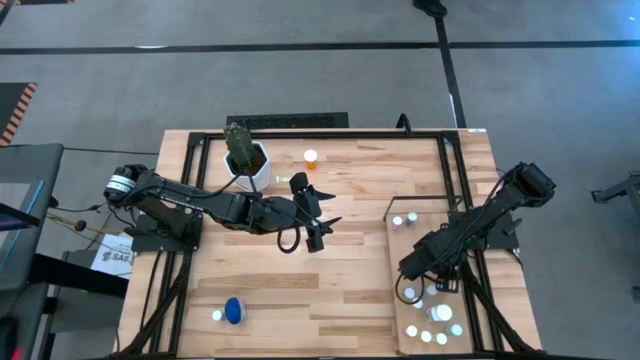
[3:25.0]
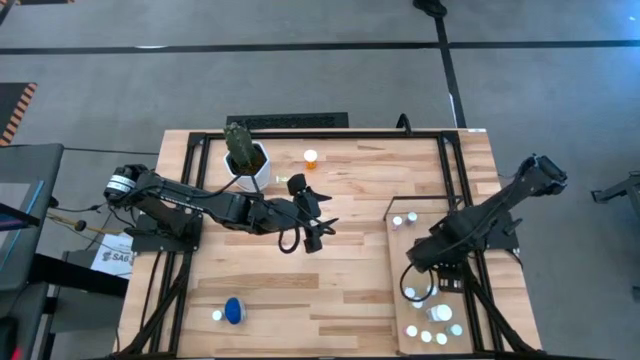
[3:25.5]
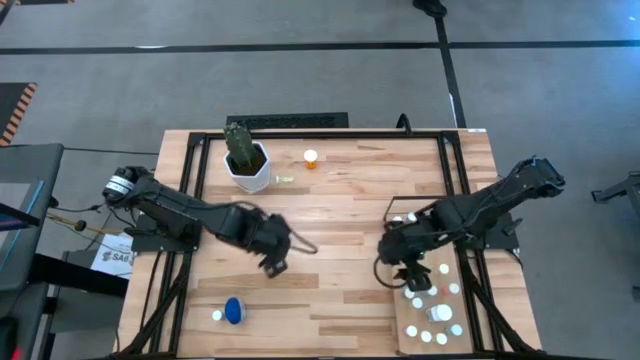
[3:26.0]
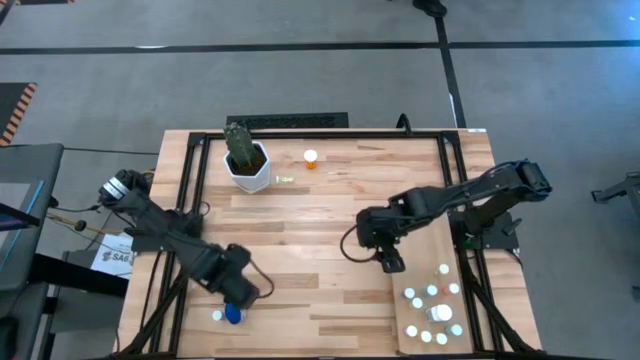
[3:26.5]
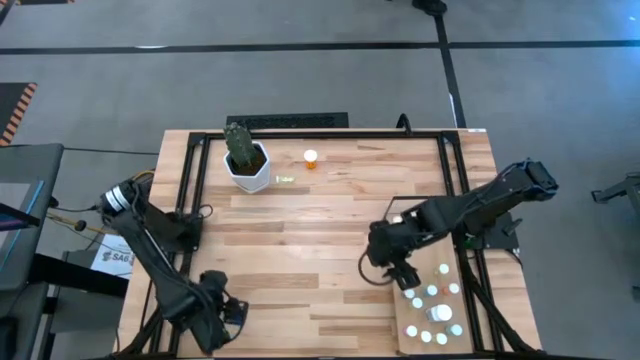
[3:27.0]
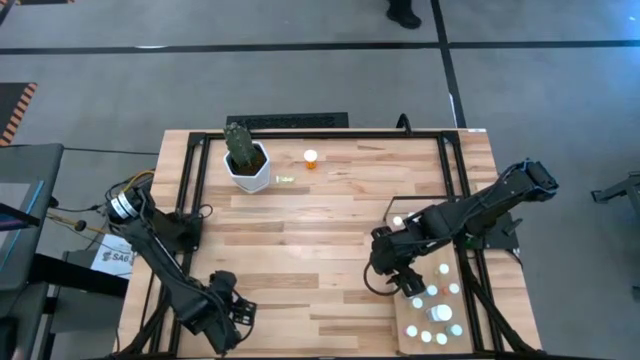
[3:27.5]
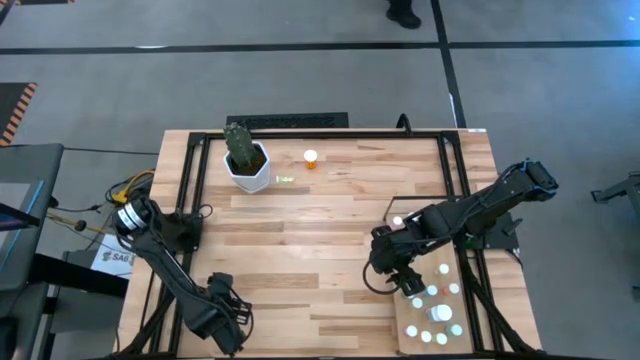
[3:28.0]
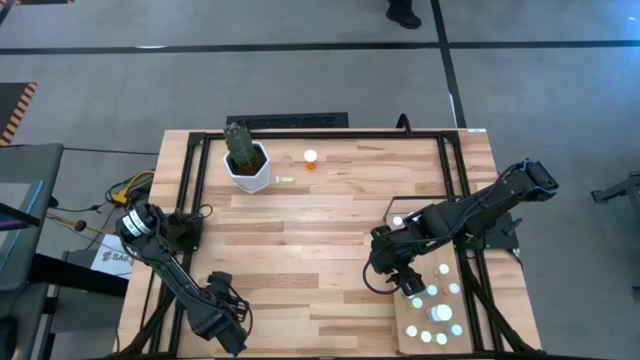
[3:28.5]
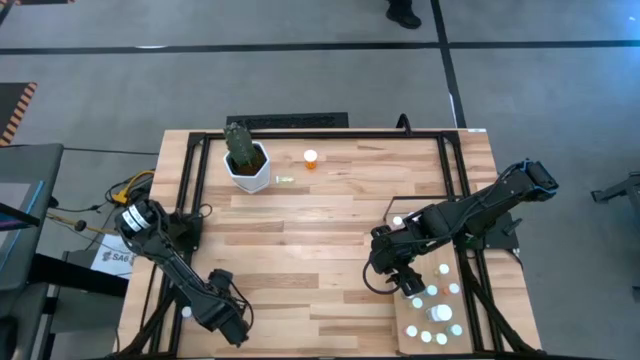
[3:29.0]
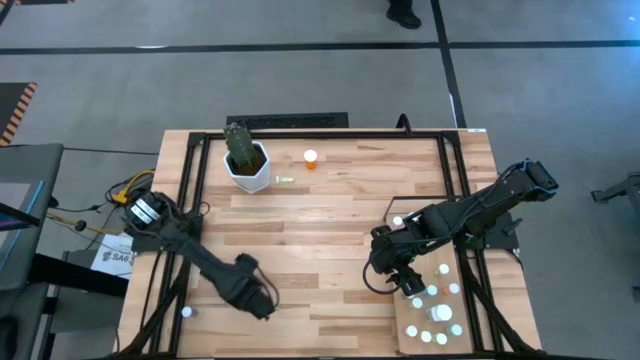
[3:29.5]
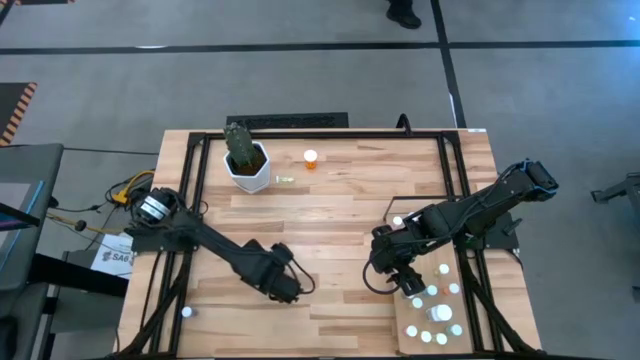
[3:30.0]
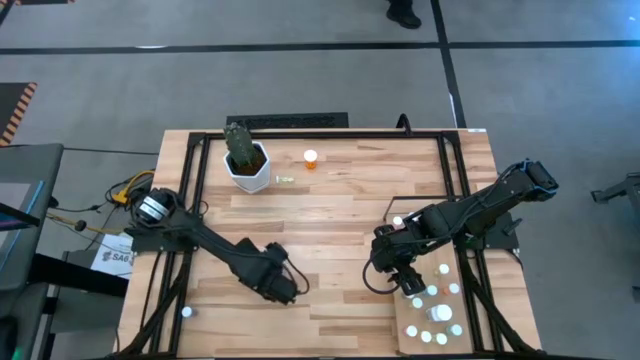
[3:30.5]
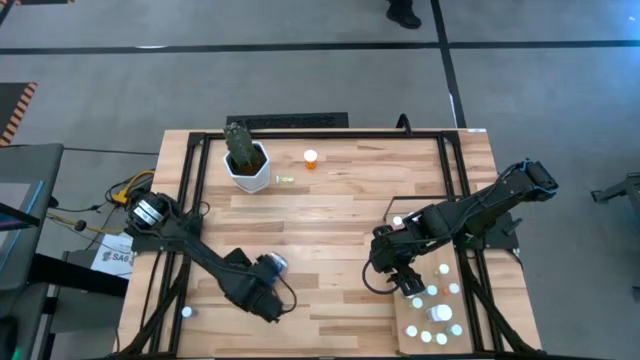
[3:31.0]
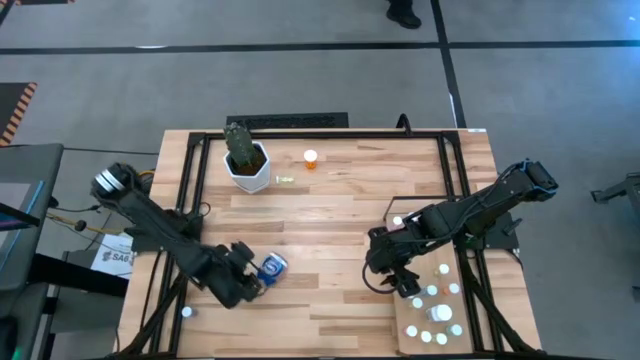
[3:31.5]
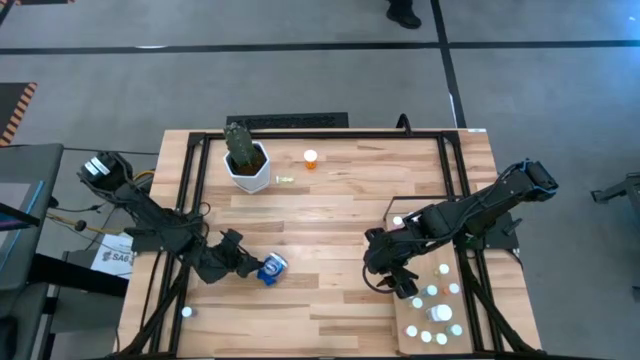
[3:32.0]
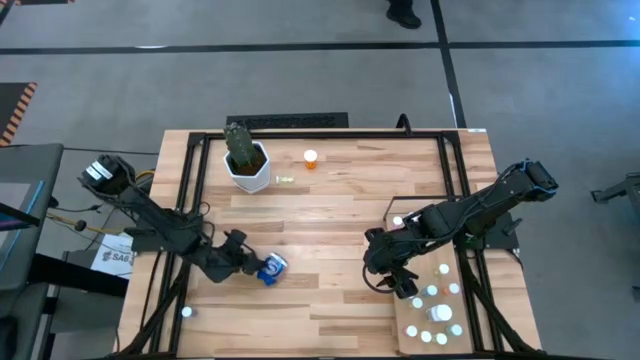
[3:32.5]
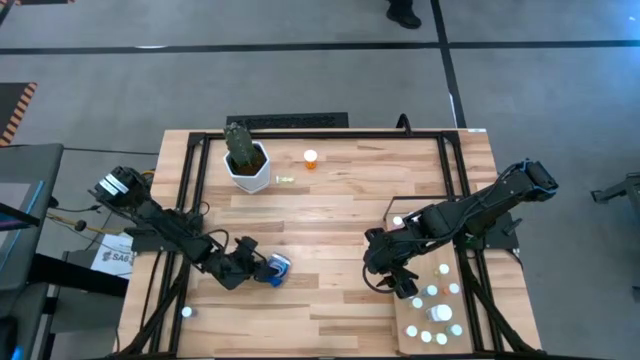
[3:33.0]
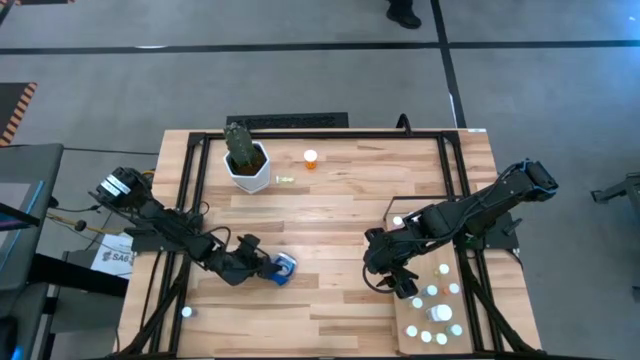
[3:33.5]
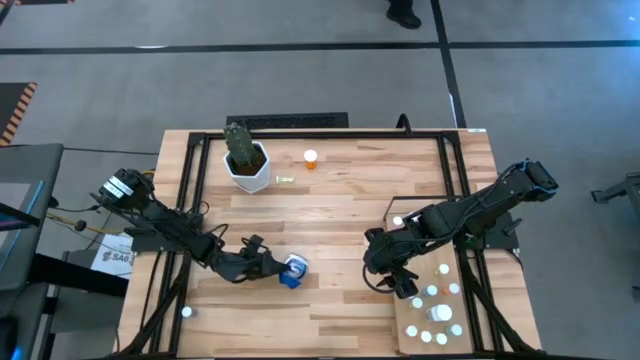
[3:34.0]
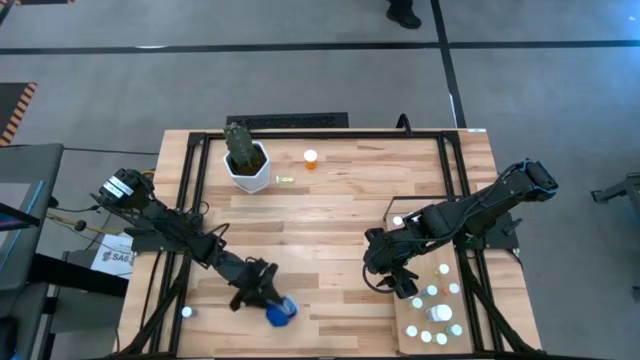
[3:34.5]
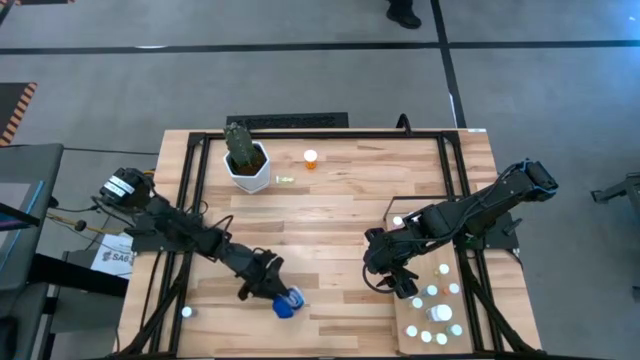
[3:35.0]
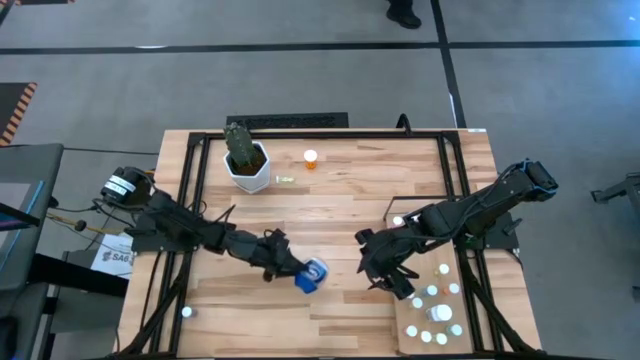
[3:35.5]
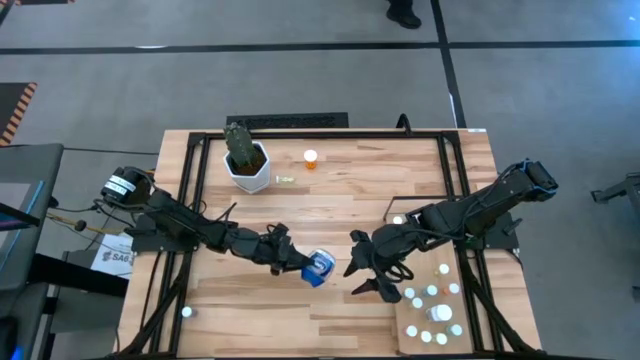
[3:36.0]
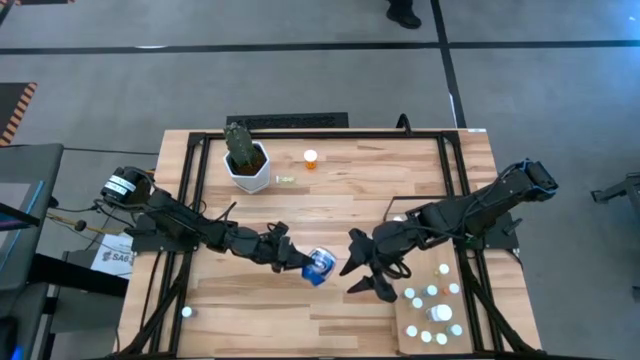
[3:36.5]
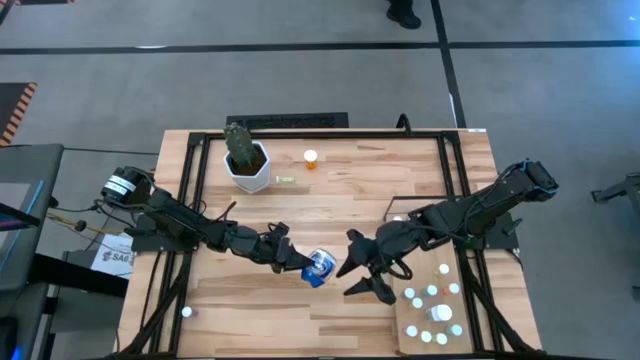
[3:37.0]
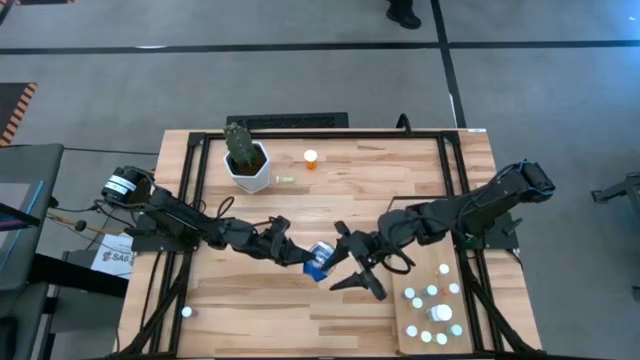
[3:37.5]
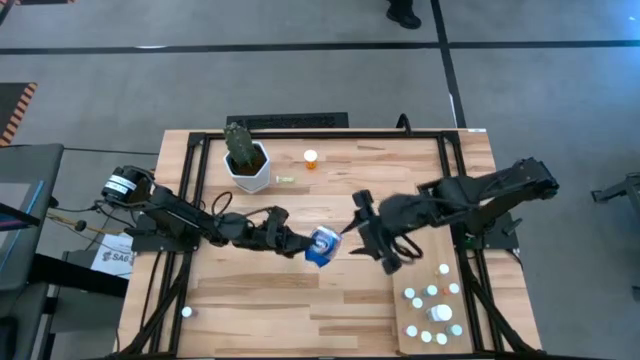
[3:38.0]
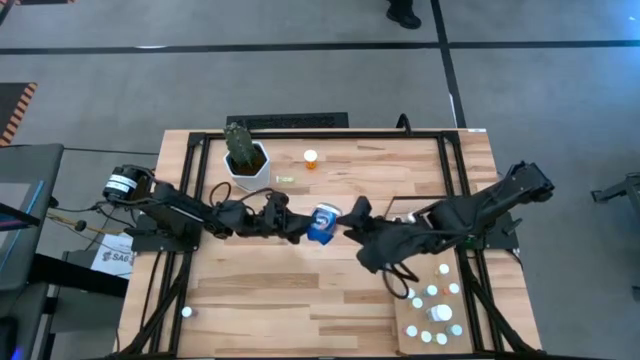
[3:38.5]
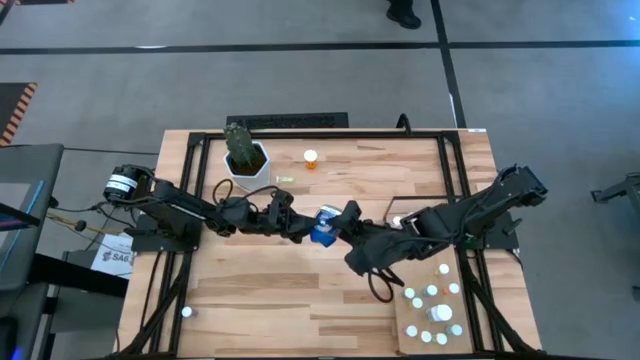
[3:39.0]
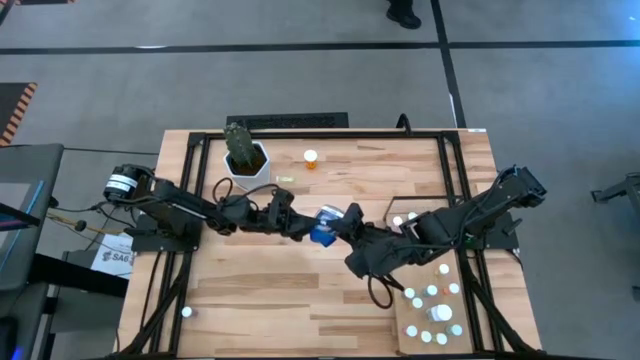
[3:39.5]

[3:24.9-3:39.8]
Task: Pick and place medicine bottles onto shelf by color
Put the transparent pill bottle on the shelf

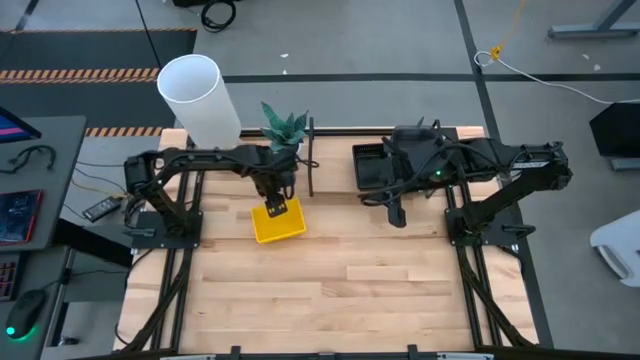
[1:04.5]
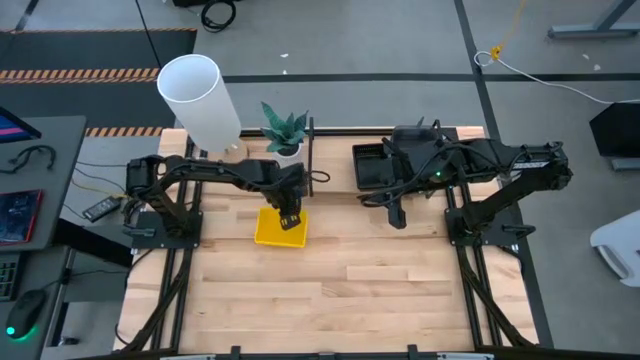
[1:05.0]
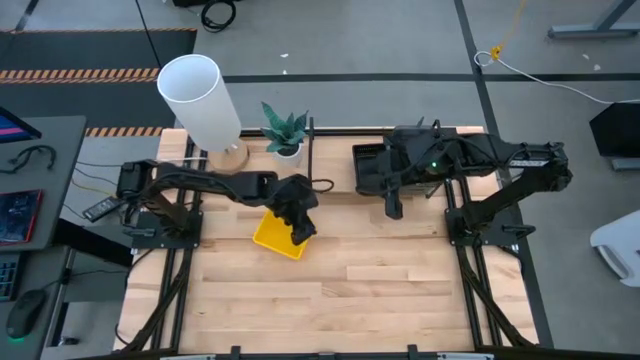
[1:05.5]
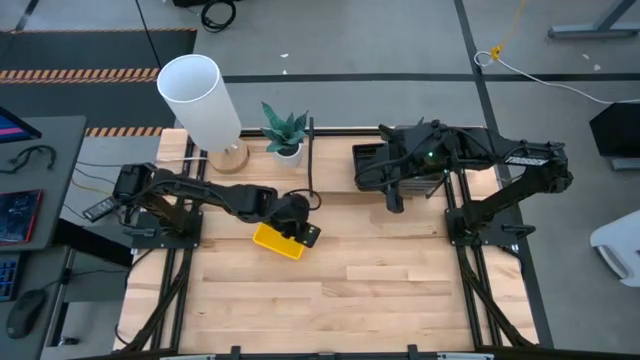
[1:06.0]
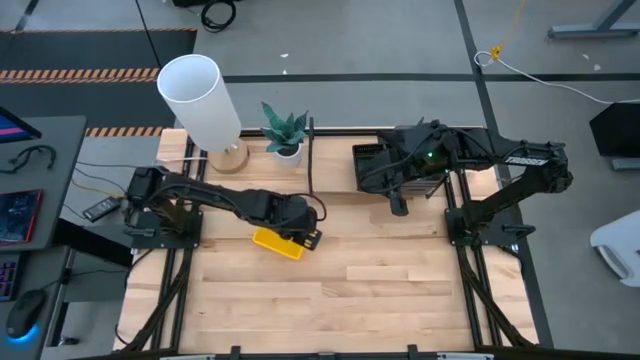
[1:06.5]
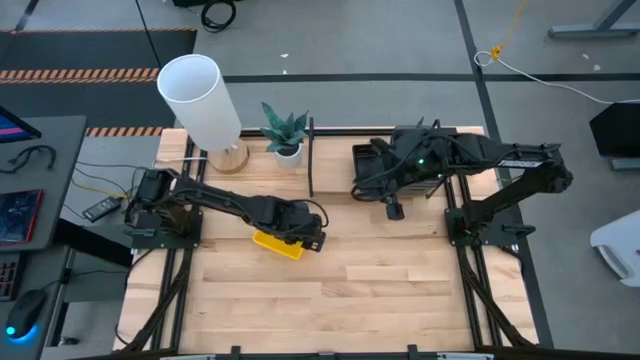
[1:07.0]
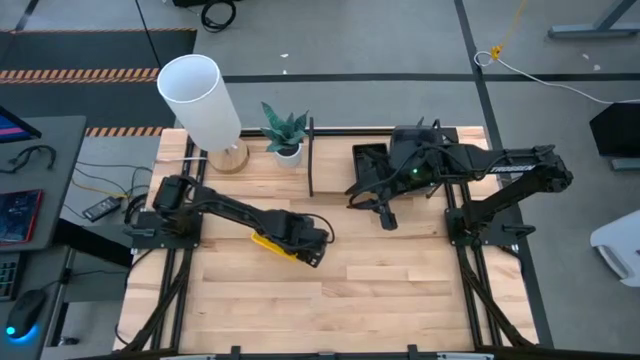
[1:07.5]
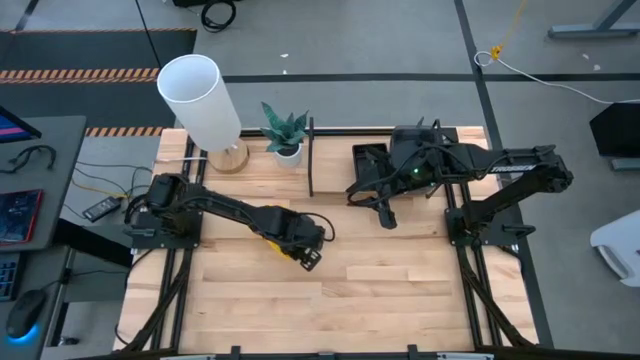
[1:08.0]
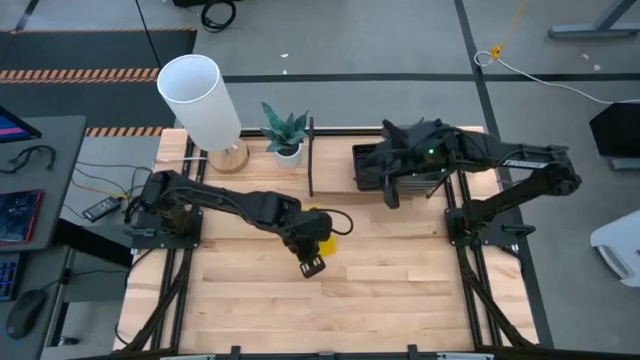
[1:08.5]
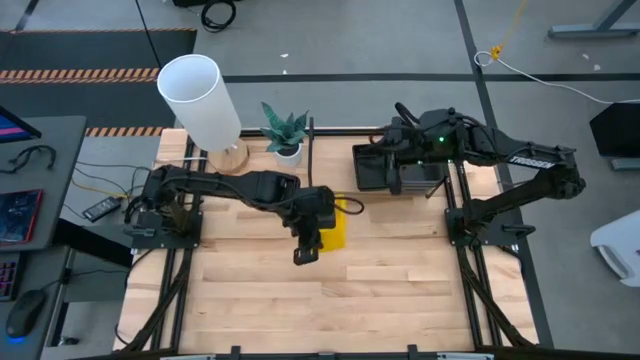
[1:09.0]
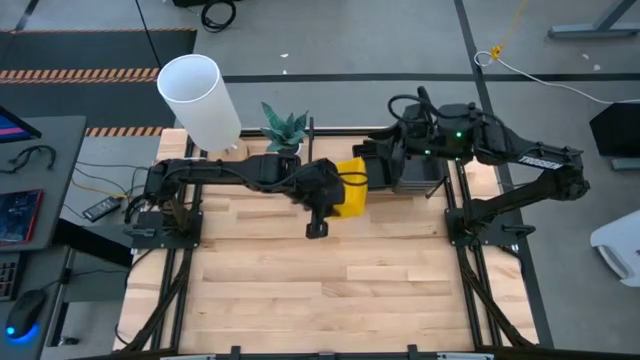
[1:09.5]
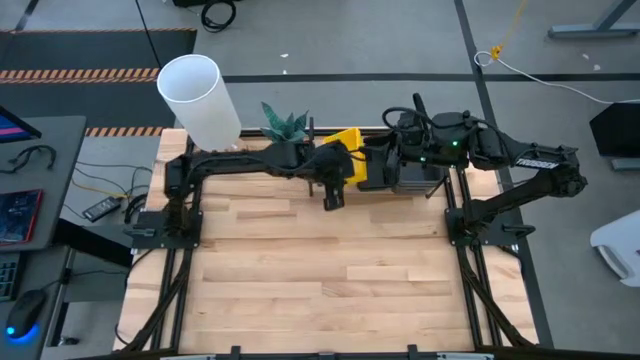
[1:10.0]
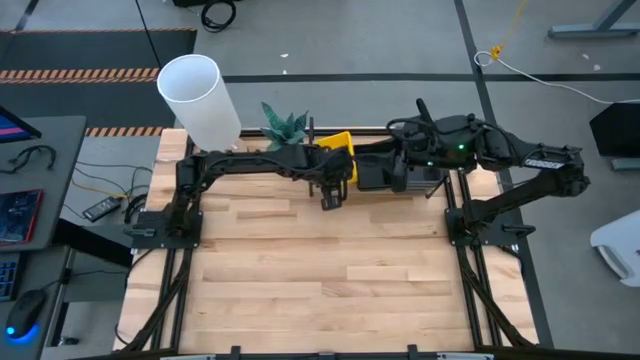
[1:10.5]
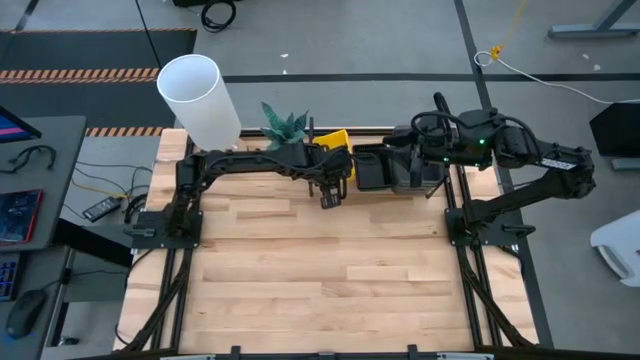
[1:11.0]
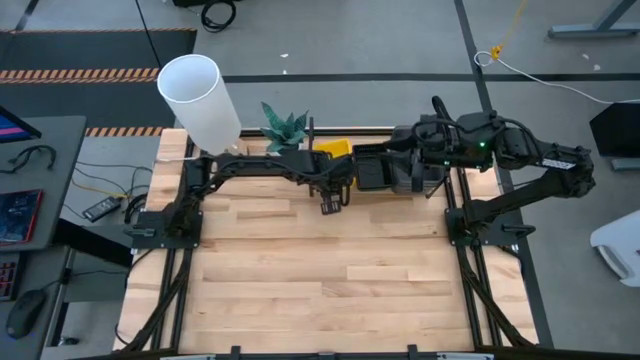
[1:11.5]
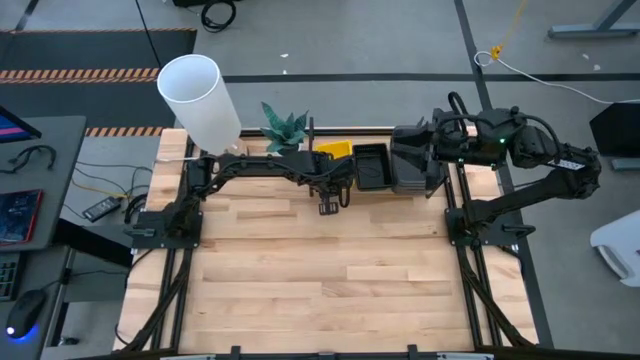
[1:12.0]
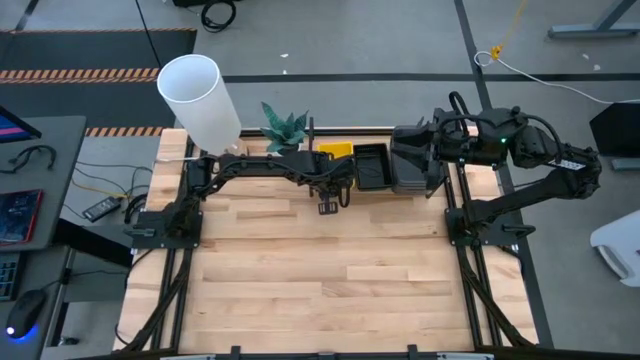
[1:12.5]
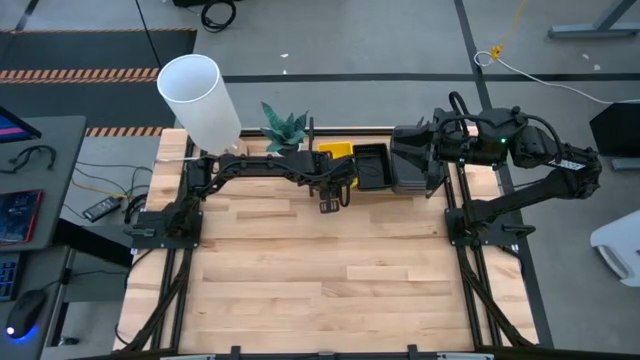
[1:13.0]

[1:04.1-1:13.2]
Task: Stack baskets on shelf by color
Put the stacked yellow basket on the shelf
